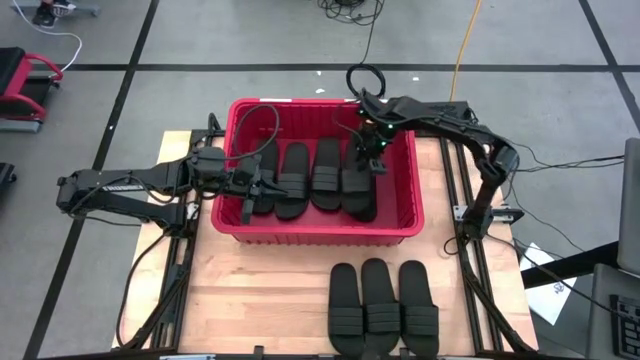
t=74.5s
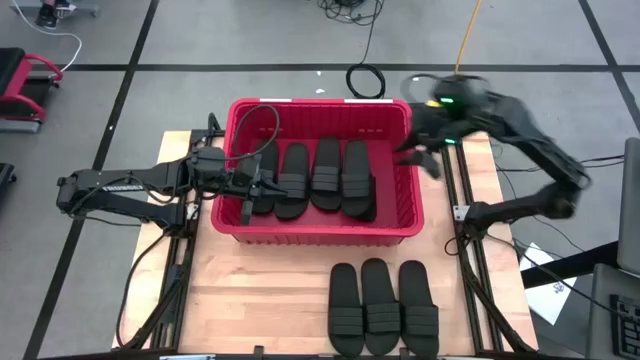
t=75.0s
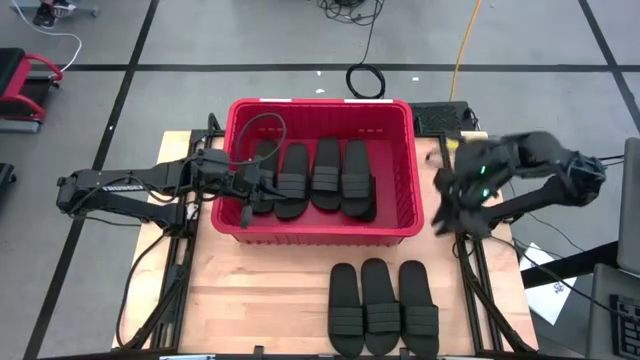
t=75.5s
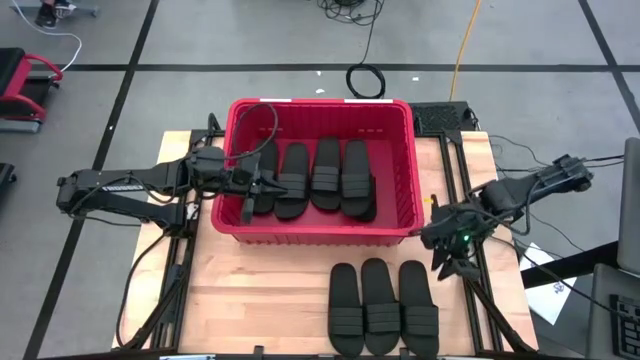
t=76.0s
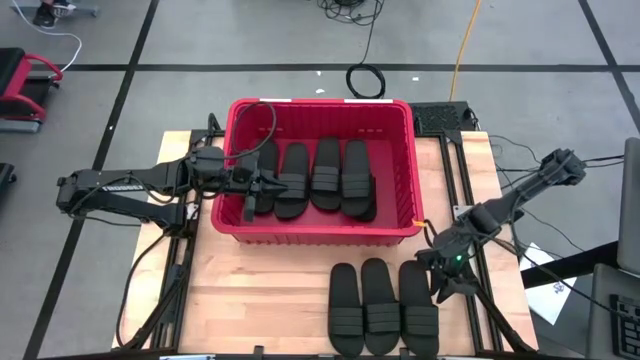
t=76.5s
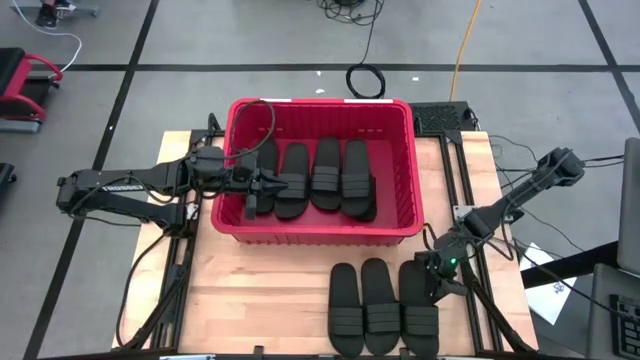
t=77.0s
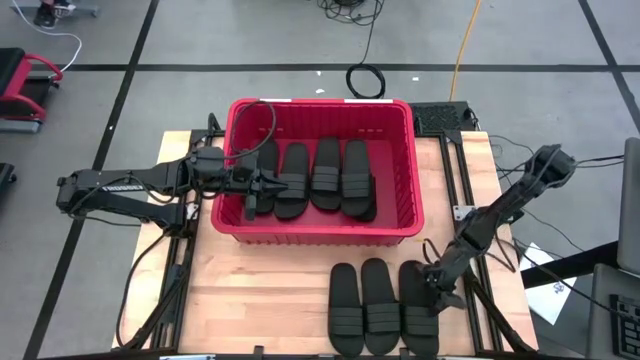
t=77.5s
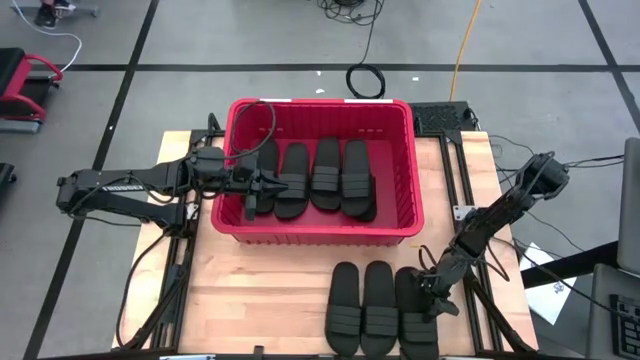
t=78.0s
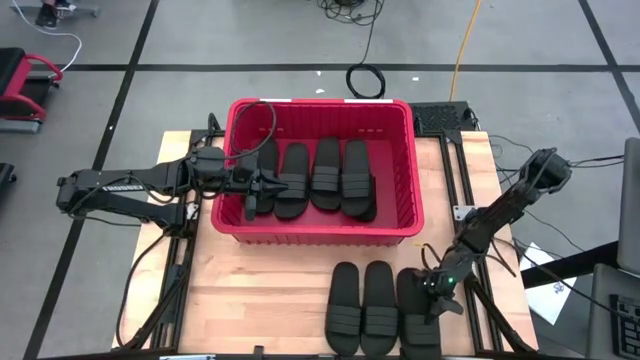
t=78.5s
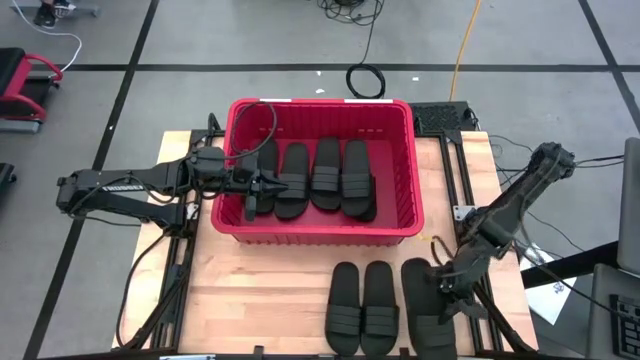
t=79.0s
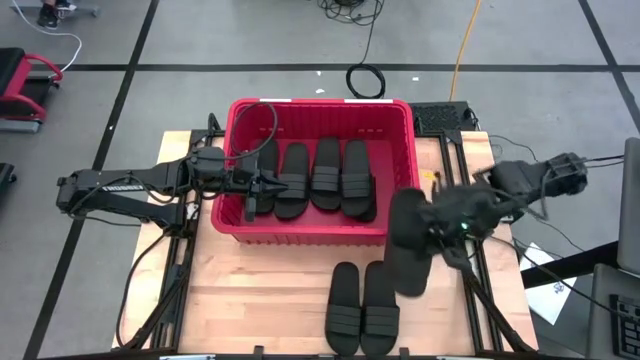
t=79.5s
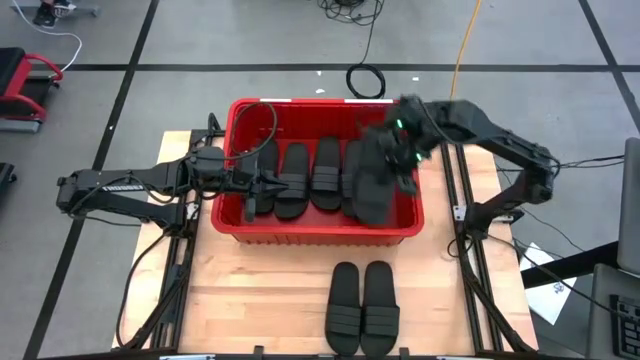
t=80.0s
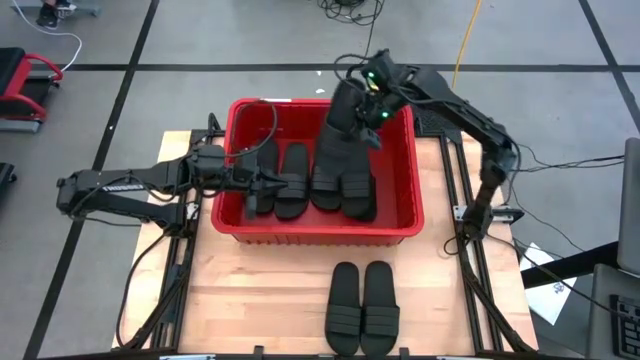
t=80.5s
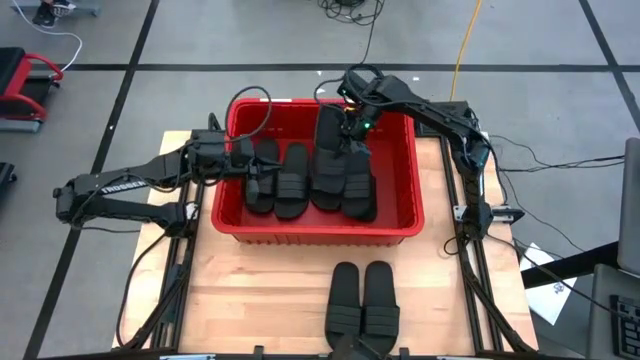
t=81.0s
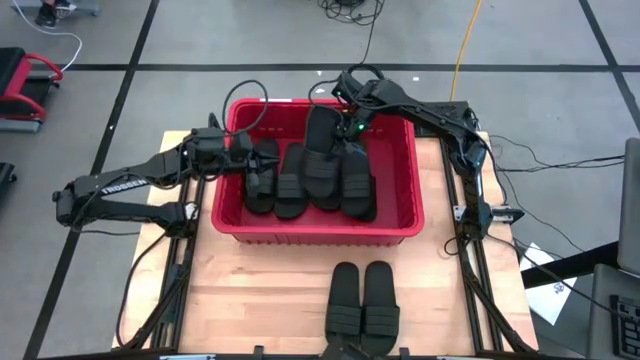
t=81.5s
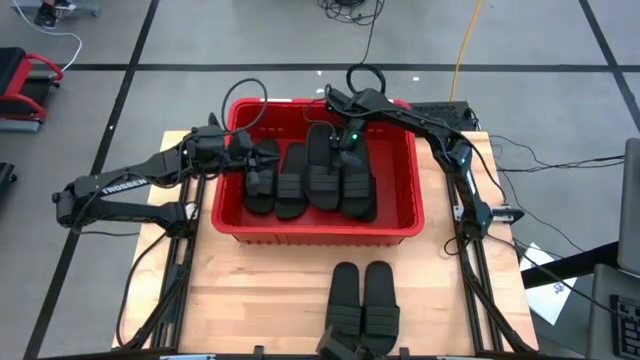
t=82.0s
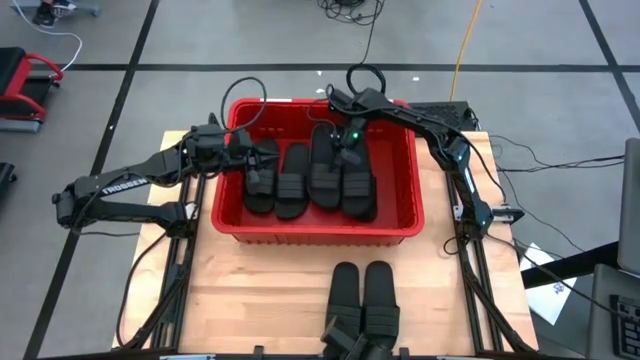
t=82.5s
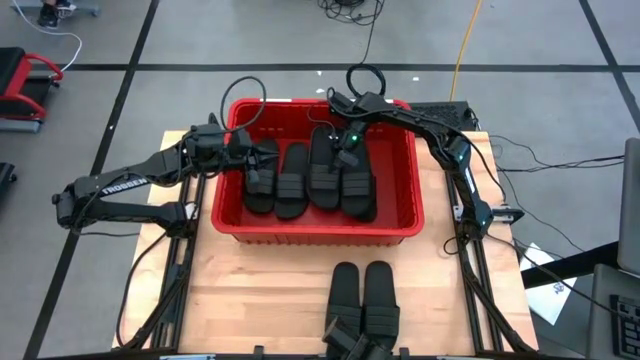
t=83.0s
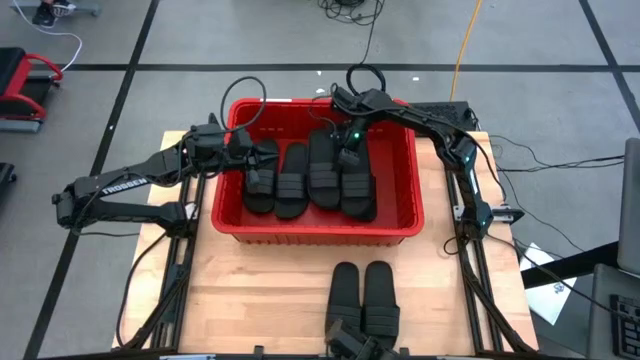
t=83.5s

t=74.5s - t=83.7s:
Task: Pick and place slides into bin
Put the black slide into the red bin

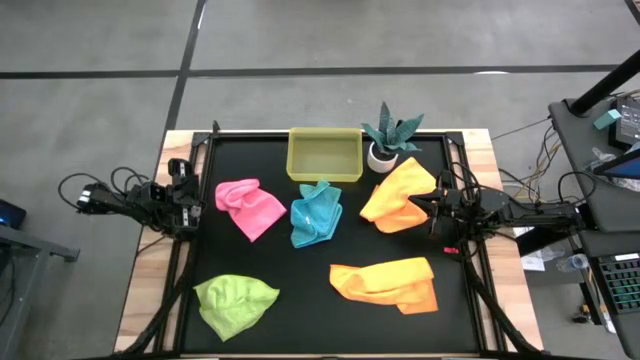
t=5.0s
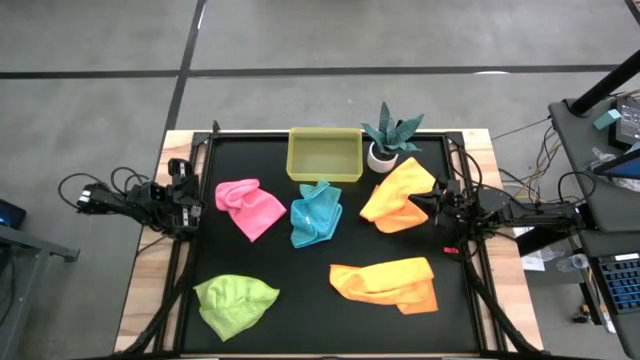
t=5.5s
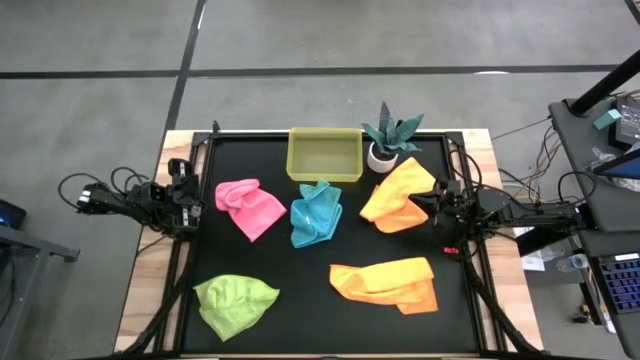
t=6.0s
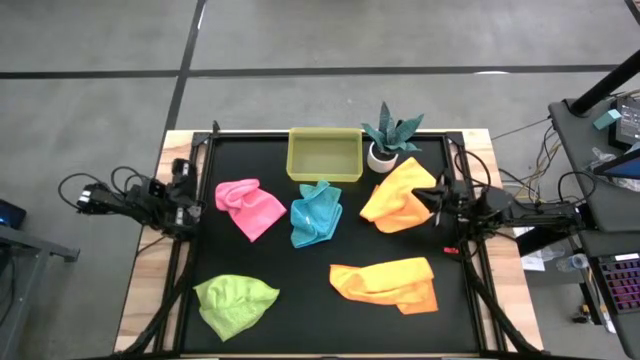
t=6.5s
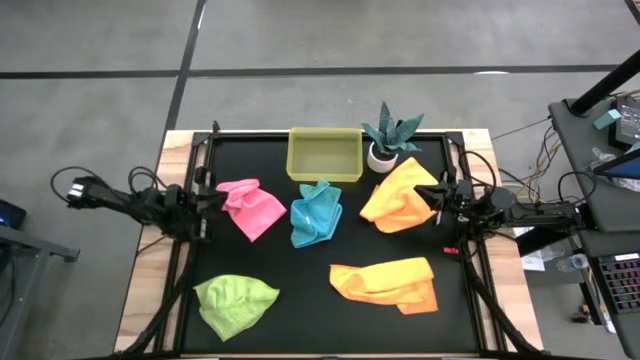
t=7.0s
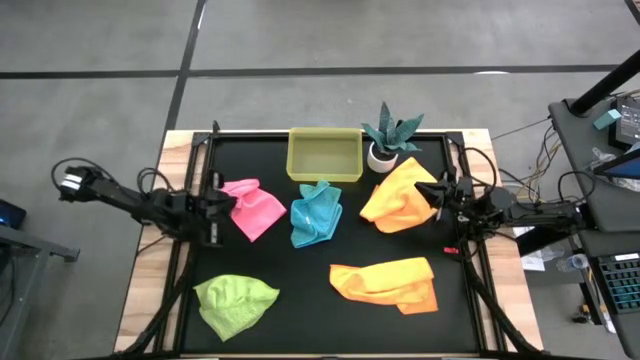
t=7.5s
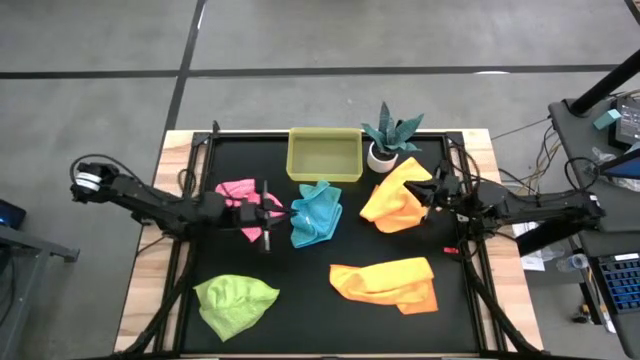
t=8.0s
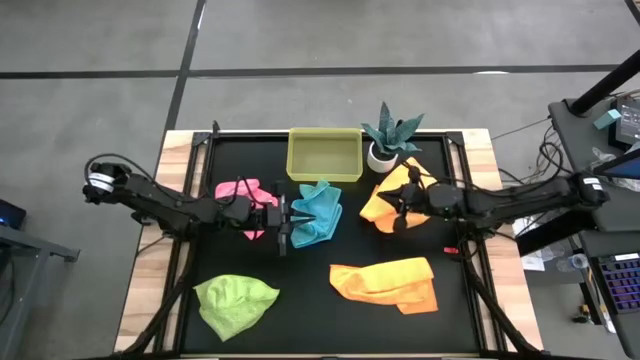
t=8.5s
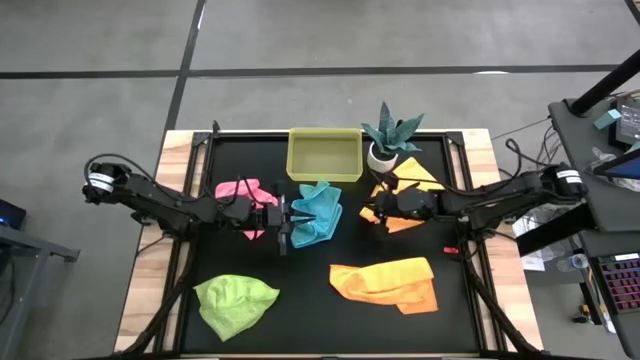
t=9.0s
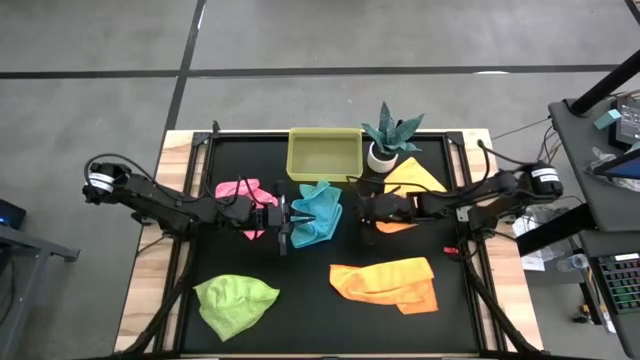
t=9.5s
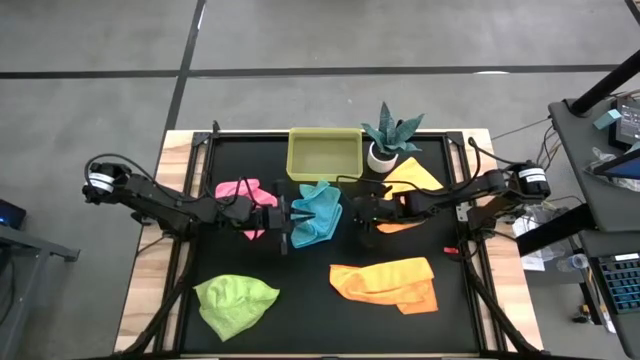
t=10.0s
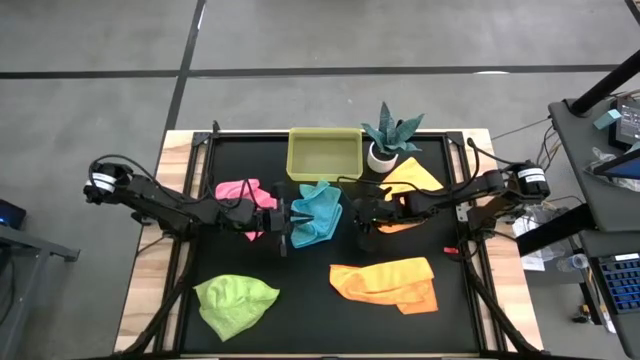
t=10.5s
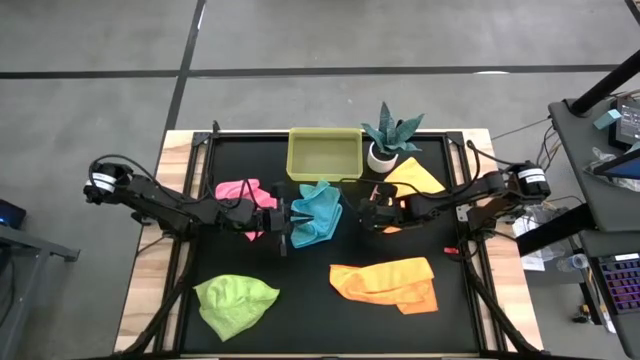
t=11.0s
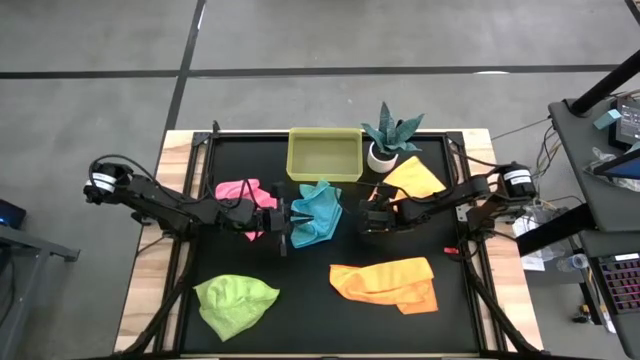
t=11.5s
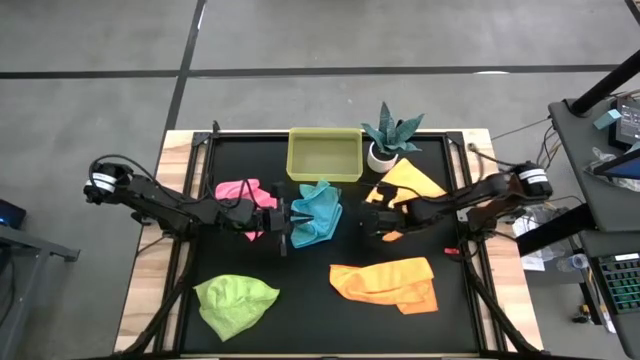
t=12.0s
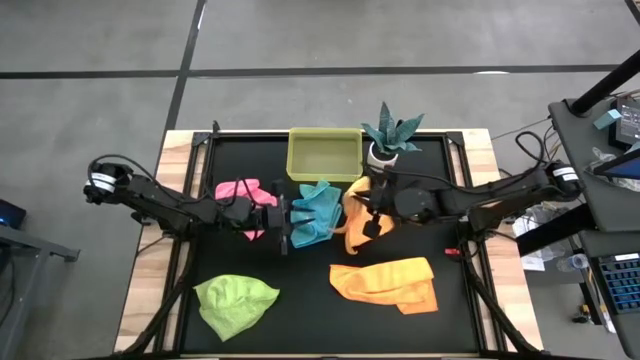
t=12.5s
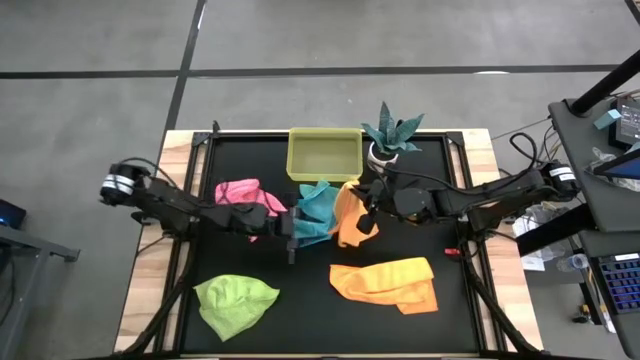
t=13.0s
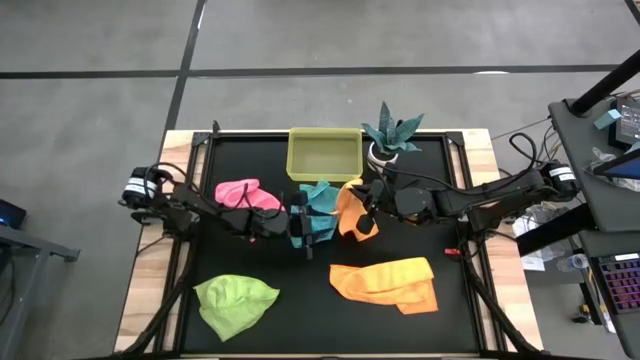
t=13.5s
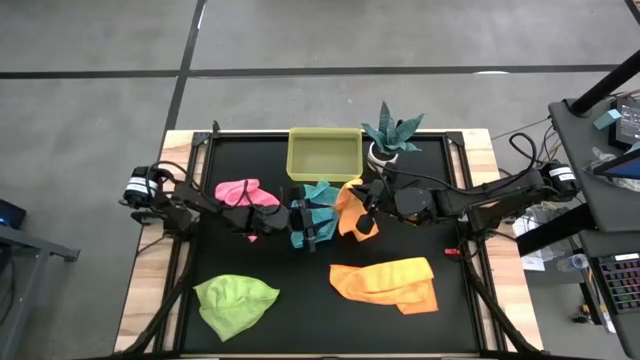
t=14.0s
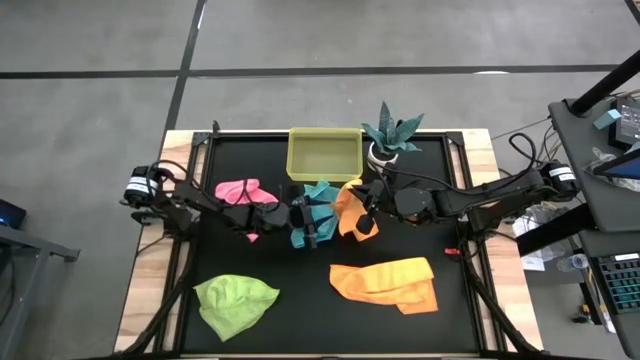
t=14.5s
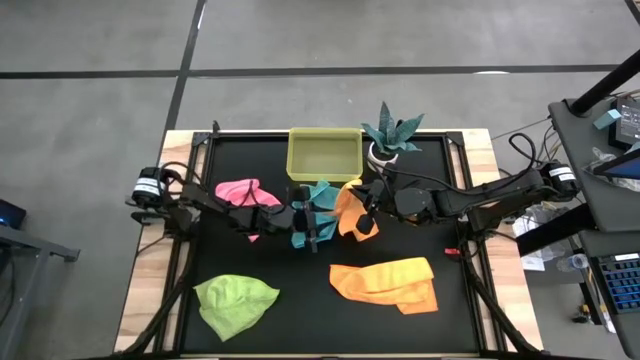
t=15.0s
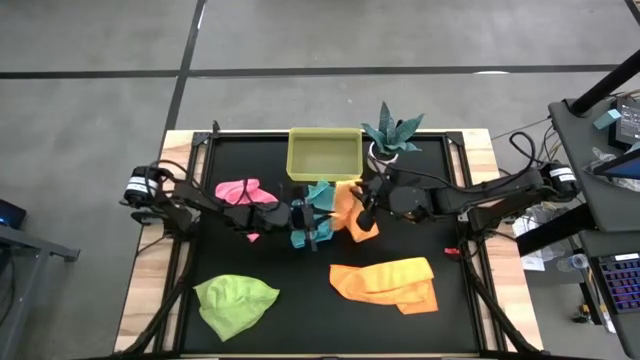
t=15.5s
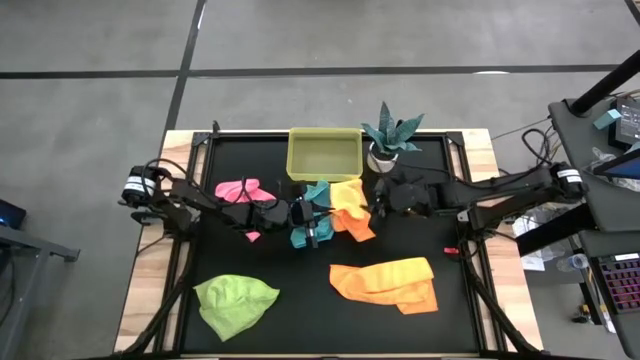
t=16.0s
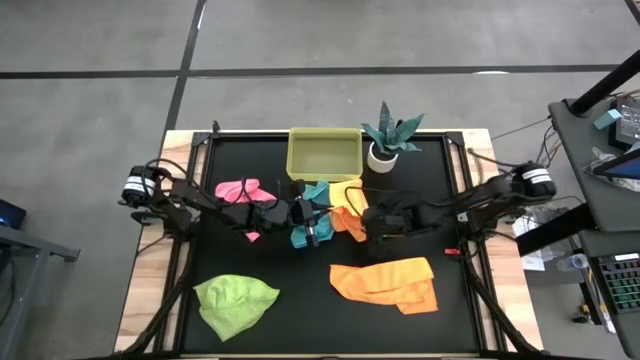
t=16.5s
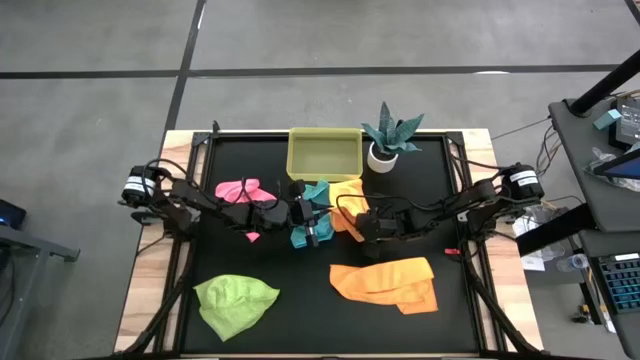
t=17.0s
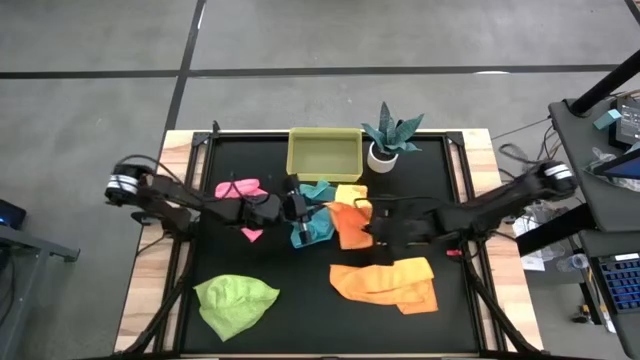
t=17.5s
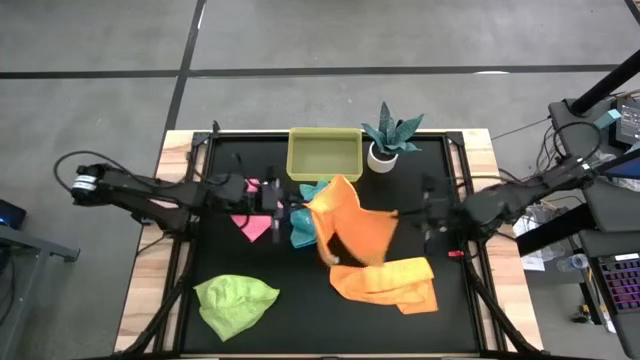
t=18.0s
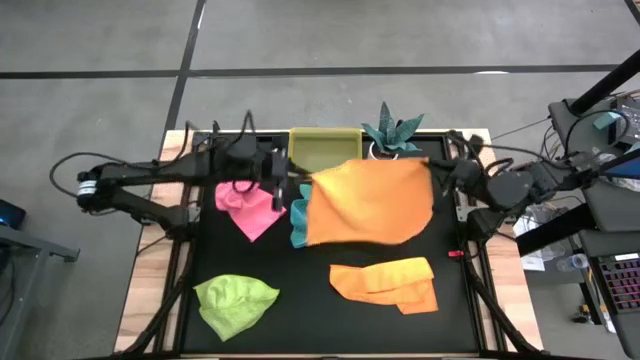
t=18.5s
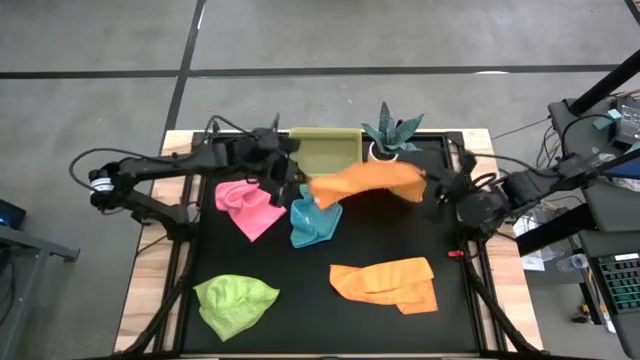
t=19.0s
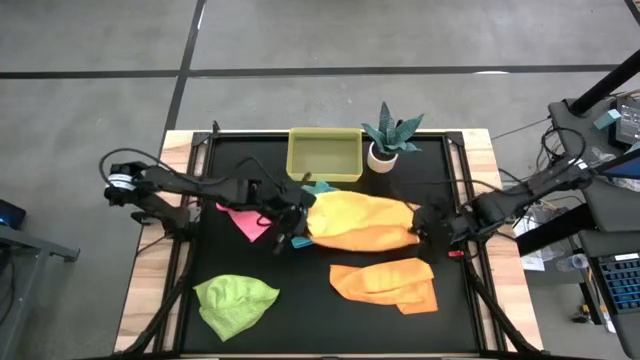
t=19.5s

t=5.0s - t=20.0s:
Task: Fold microfiber towels
Fold the top orange microfiber cloth
